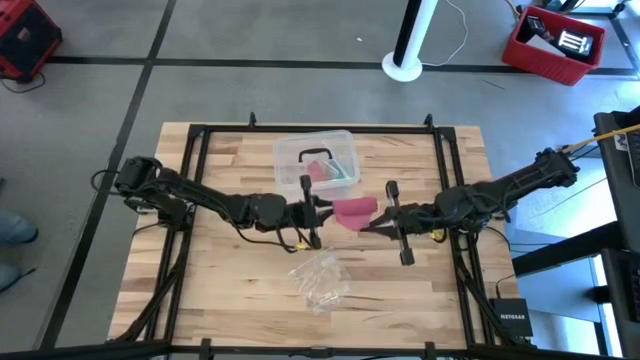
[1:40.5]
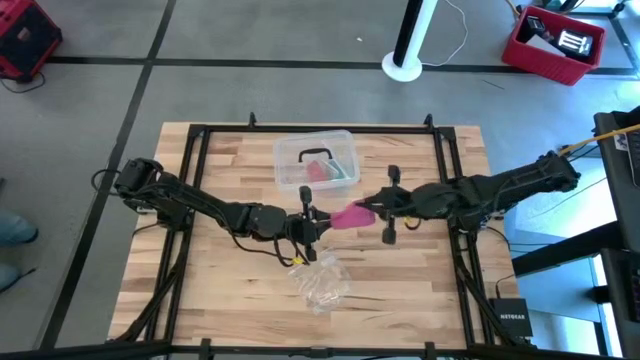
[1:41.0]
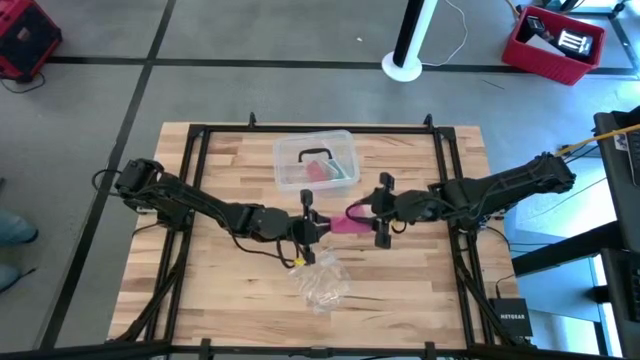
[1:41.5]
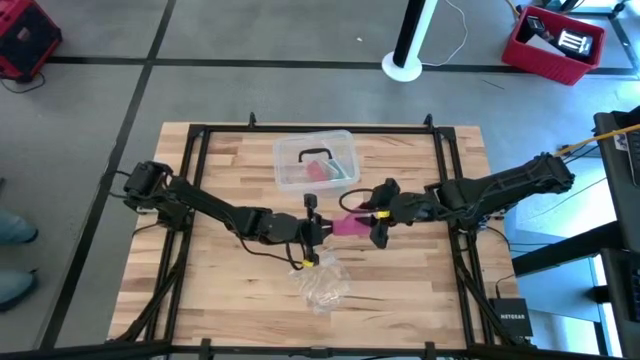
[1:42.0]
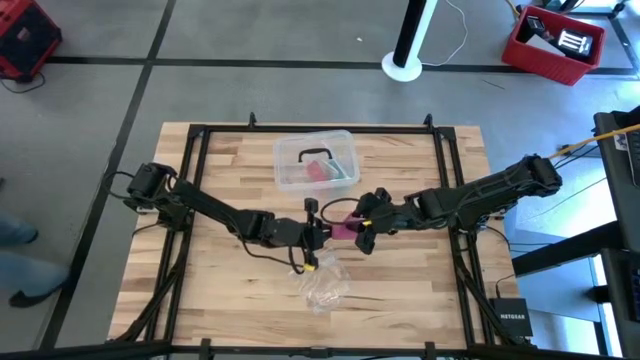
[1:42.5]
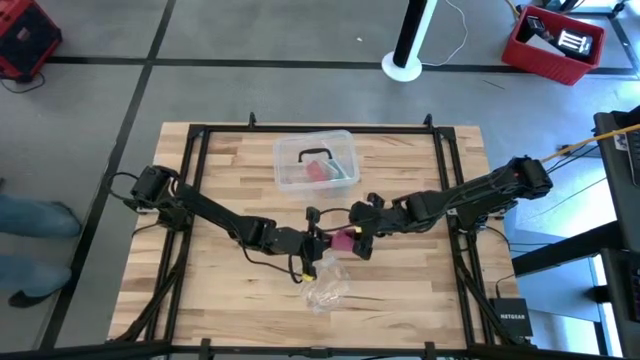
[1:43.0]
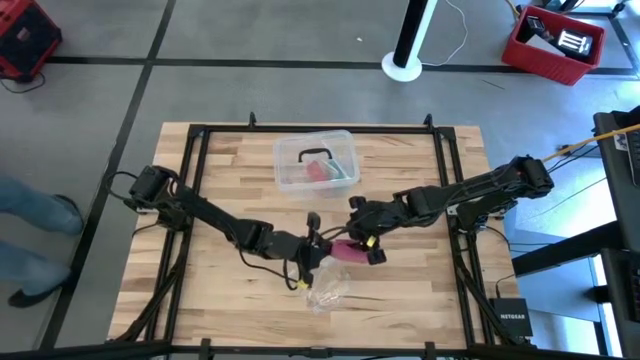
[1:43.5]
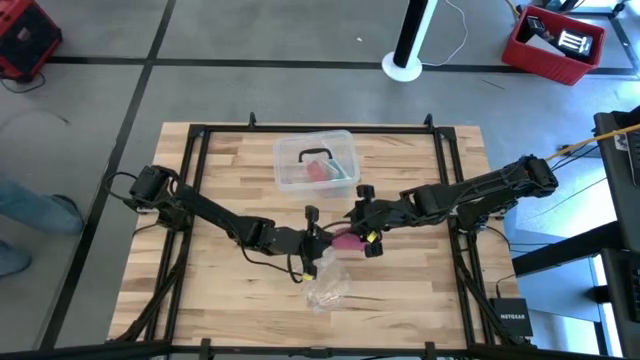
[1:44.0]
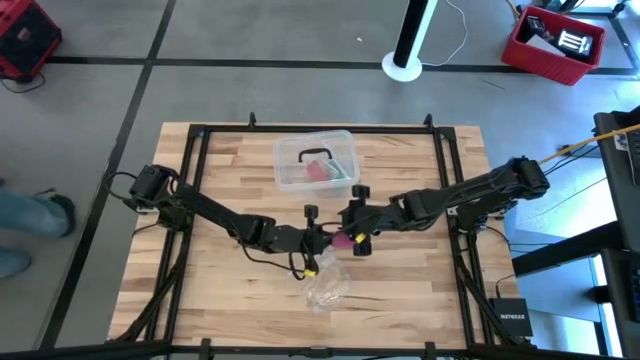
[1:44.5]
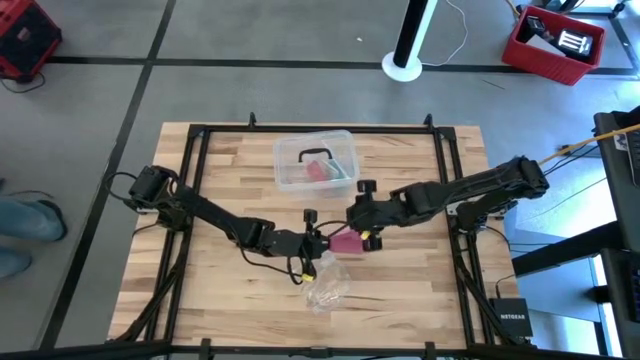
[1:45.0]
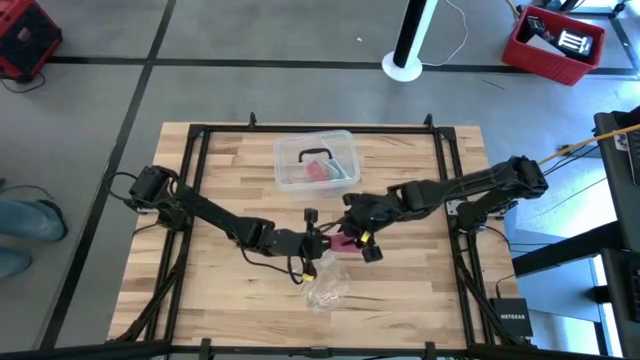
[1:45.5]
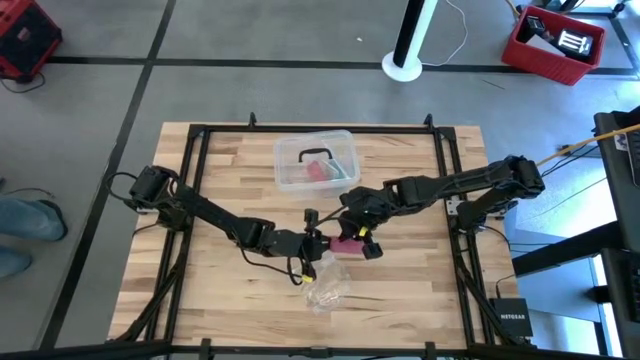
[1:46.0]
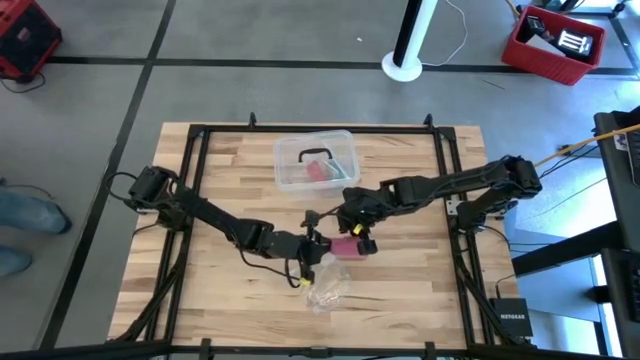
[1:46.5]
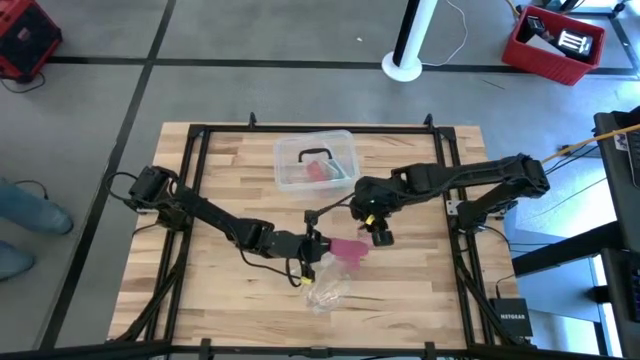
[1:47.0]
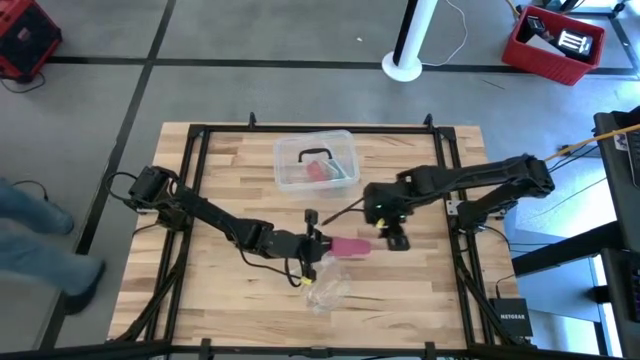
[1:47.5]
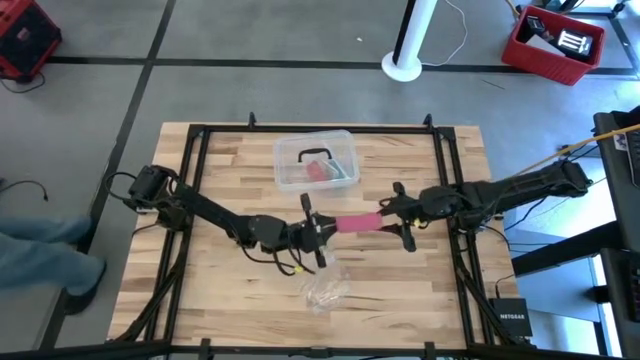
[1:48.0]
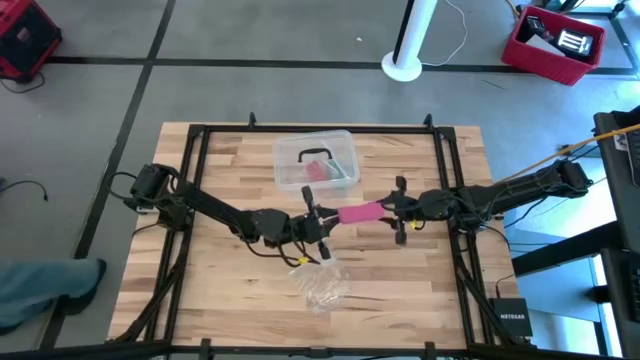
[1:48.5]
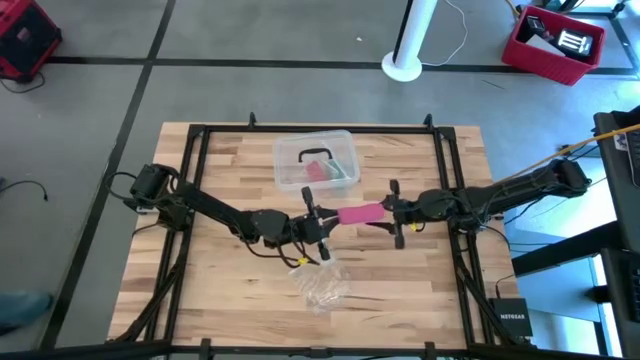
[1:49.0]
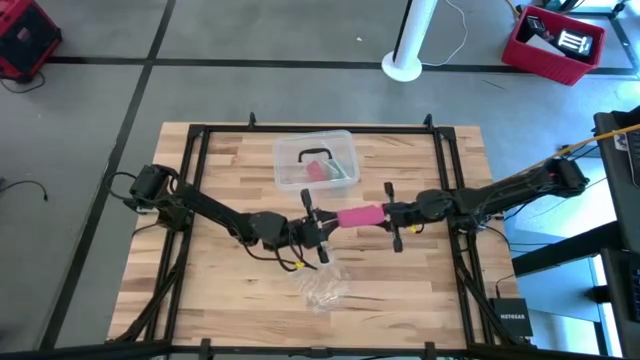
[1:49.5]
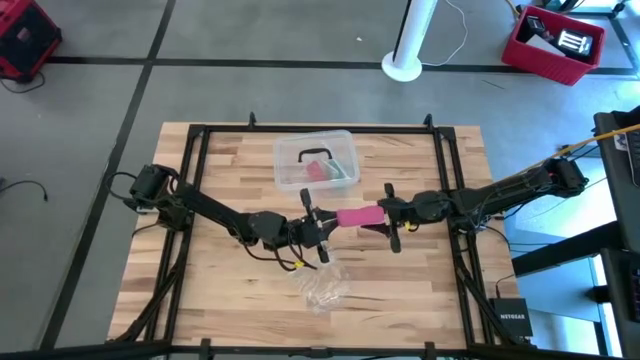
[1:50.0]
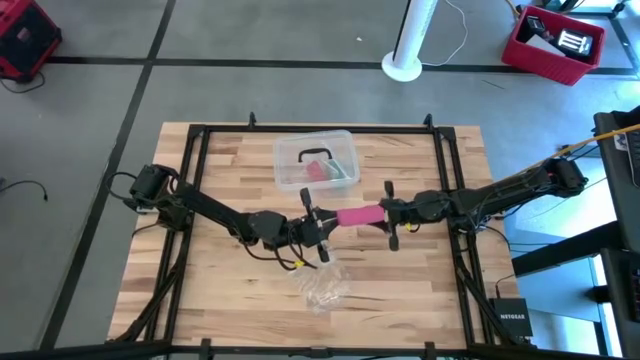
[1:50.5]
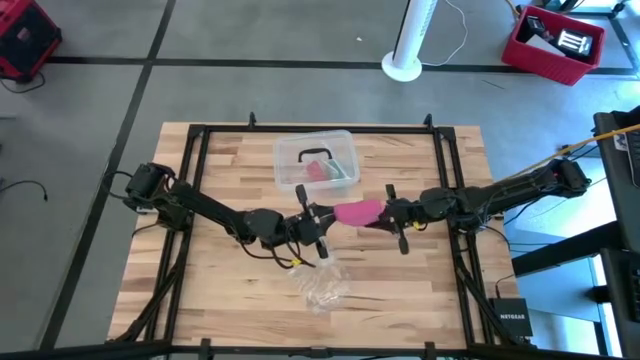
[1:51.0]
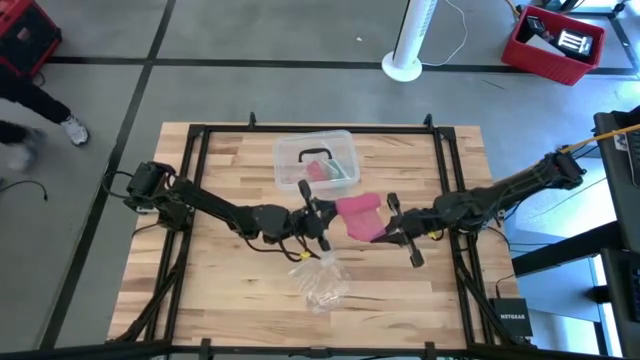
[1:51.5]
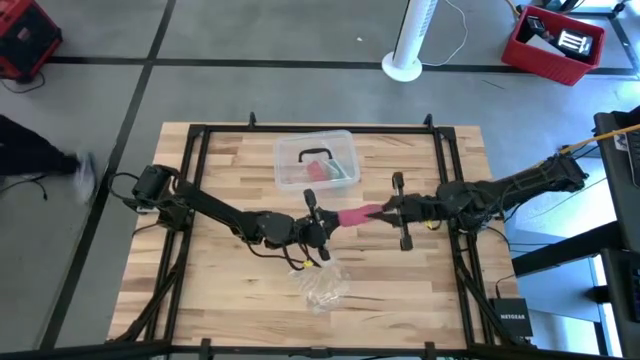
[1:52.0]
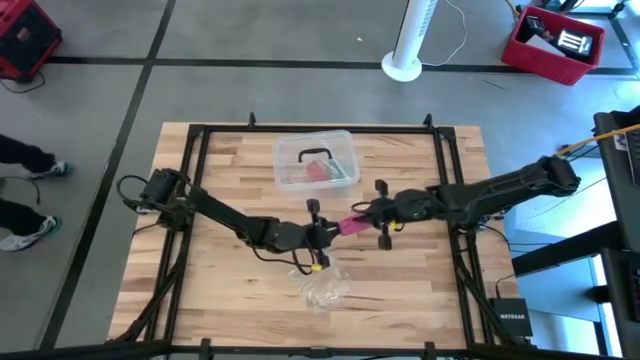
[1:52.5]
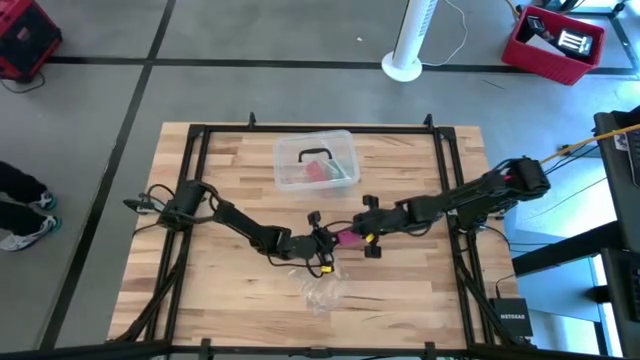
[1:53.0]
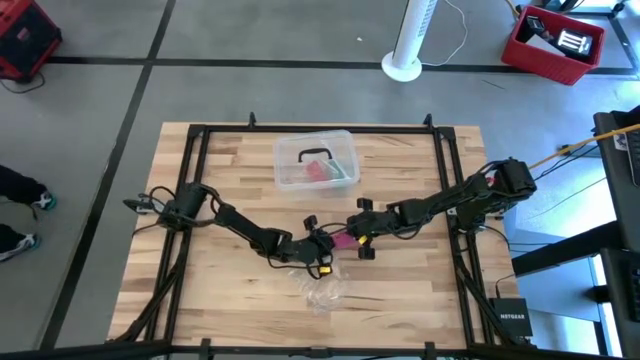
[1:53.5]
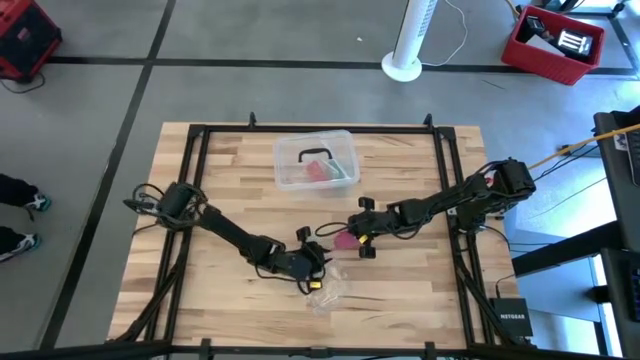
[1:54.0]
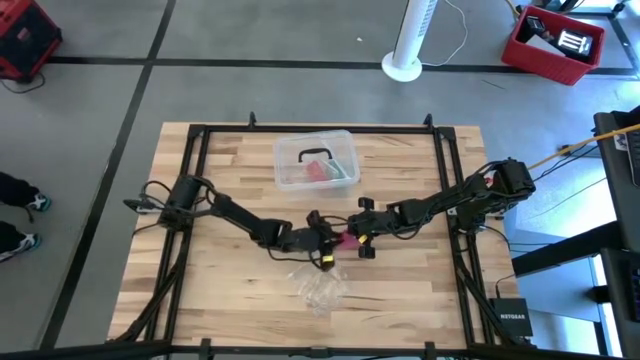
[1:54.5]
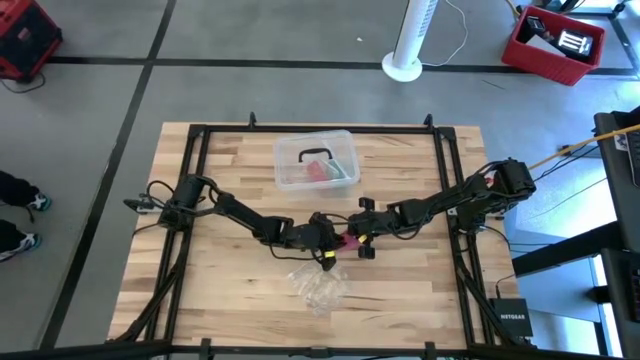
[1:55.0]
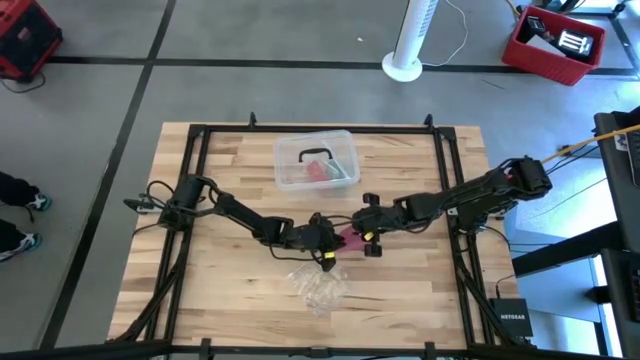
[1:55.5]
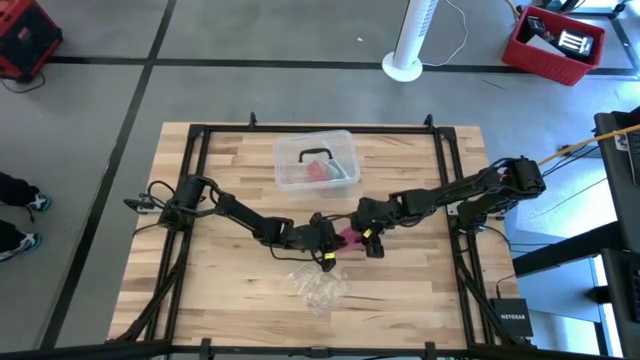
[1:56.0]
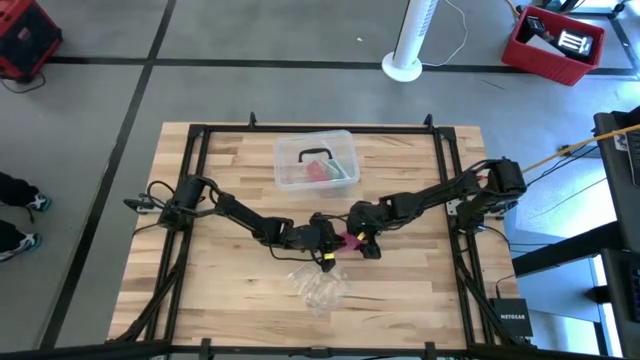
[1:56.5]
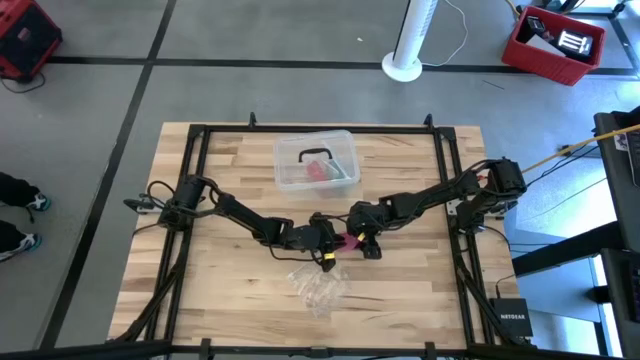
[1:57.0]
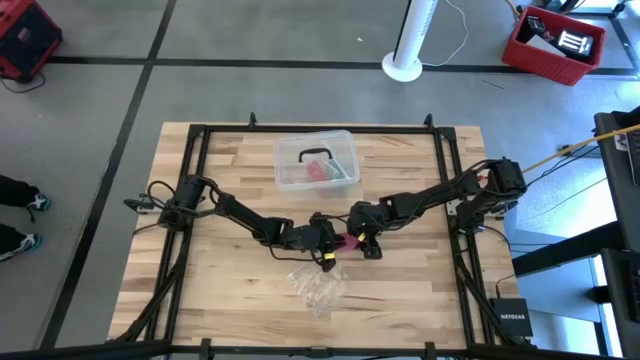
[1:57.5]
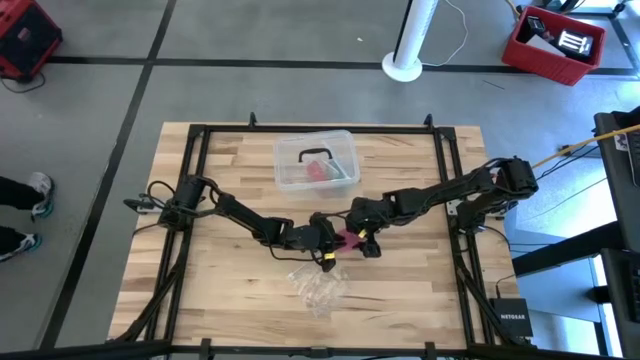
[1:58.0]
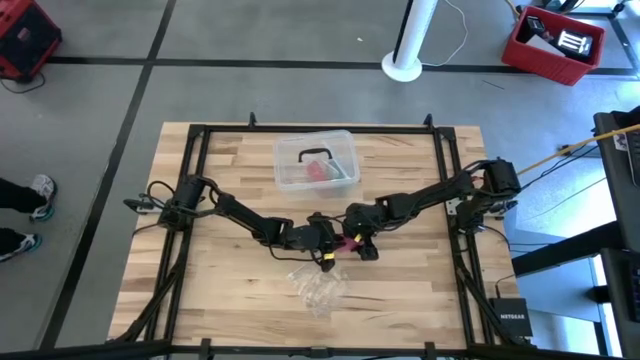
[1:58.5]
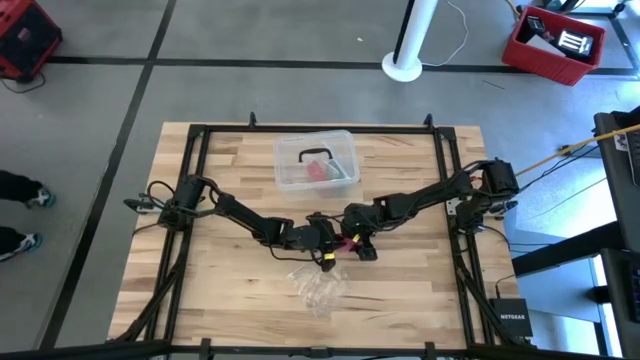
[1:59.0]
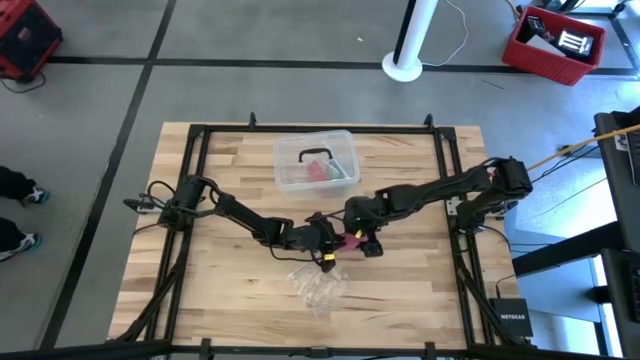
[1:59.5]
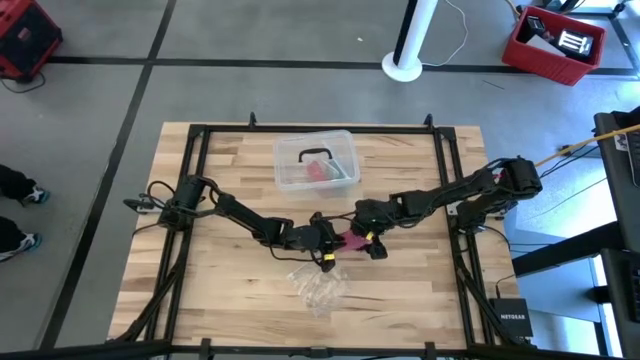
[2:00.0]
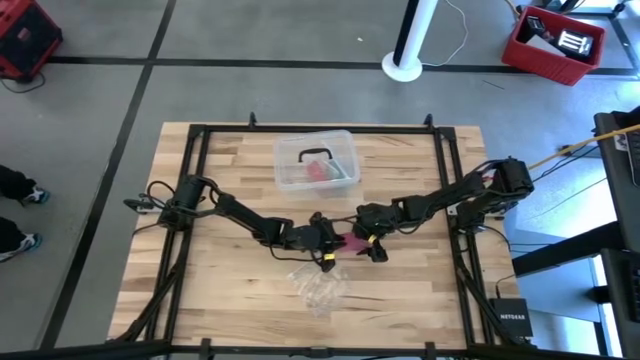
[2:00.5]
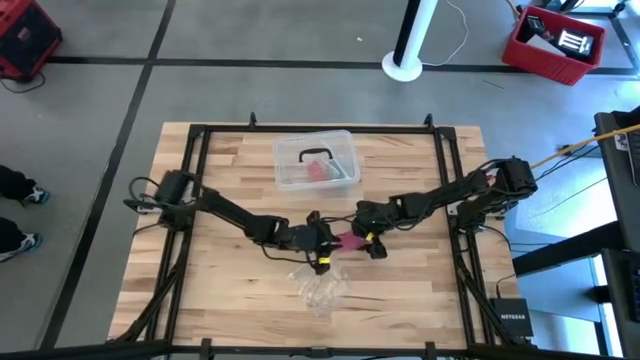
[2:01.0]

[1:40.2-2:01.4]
Task: Roll bandage
Roll the pink bandage
